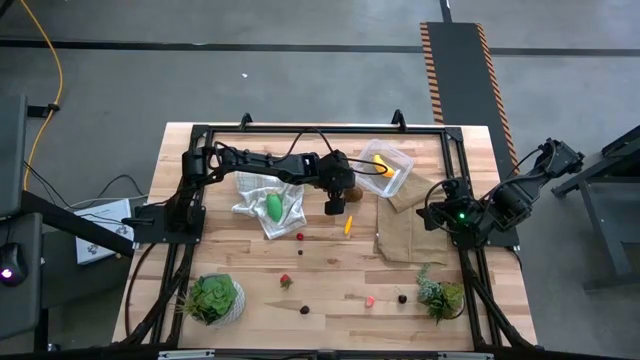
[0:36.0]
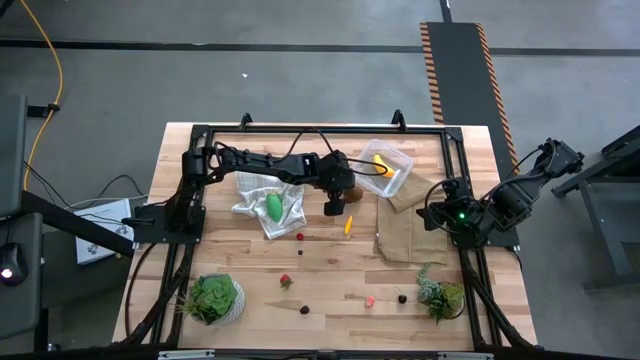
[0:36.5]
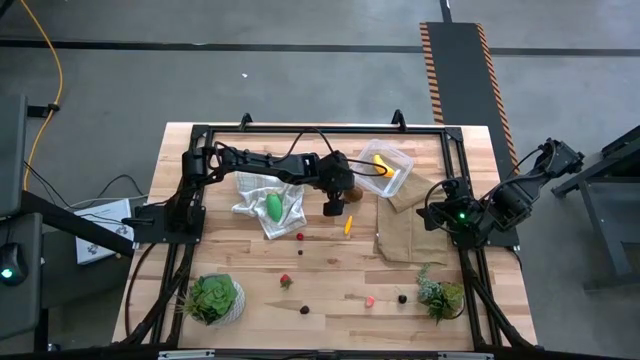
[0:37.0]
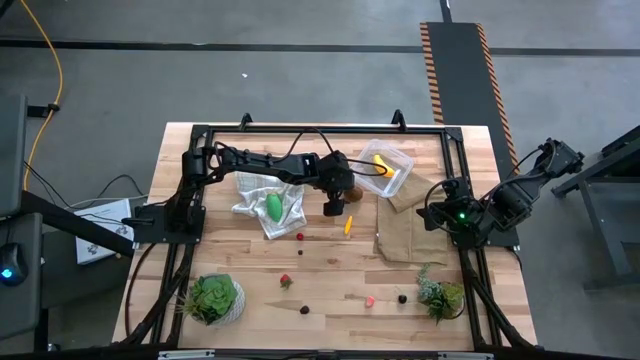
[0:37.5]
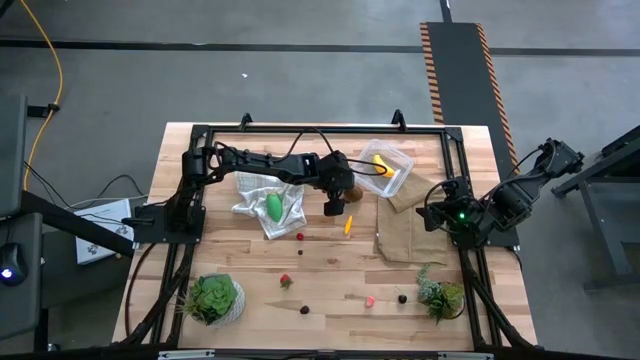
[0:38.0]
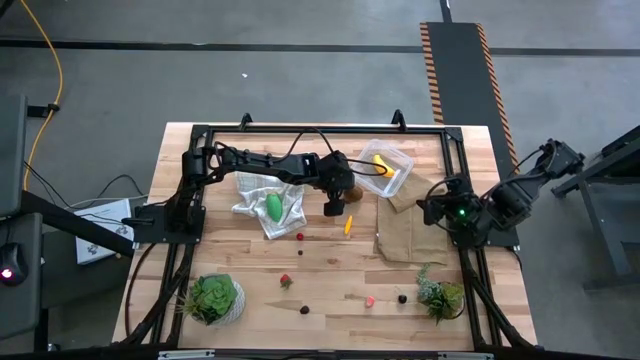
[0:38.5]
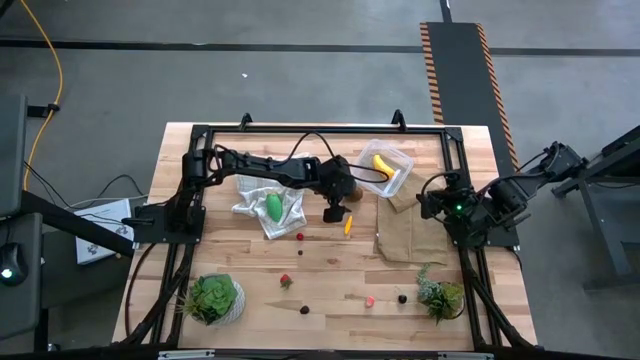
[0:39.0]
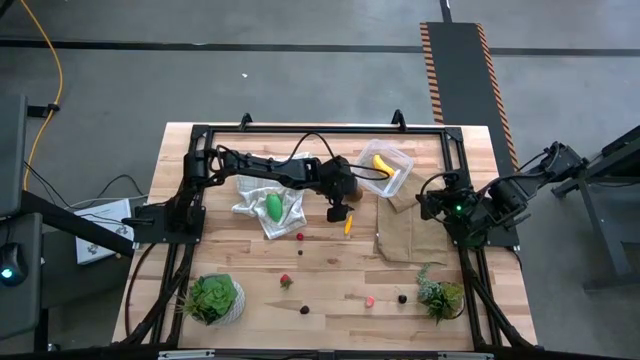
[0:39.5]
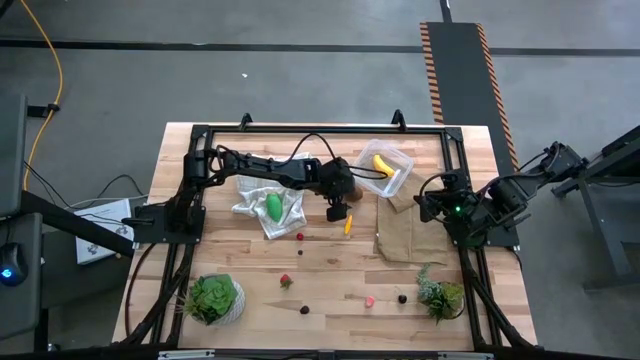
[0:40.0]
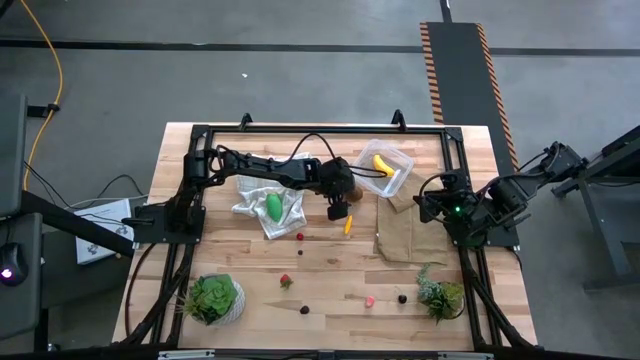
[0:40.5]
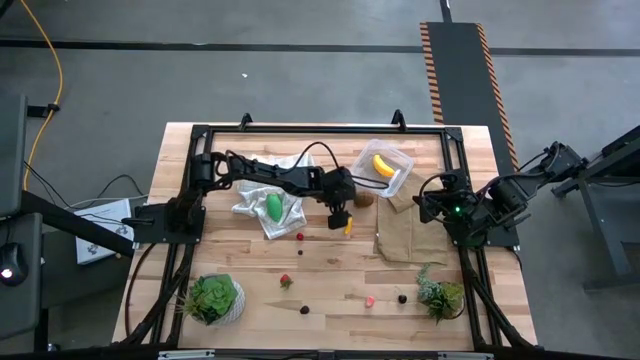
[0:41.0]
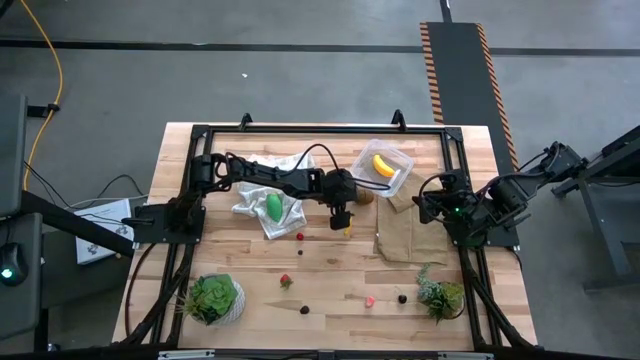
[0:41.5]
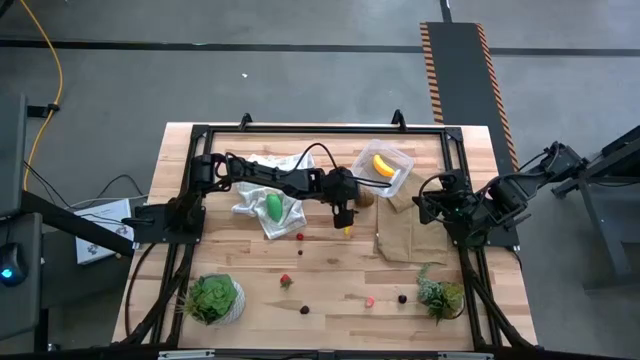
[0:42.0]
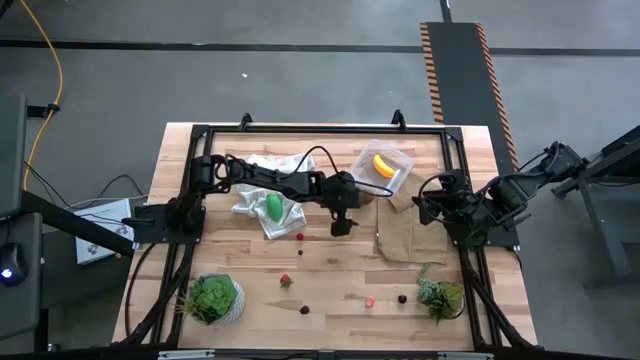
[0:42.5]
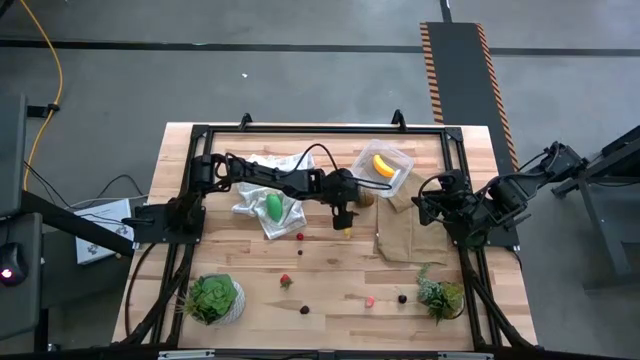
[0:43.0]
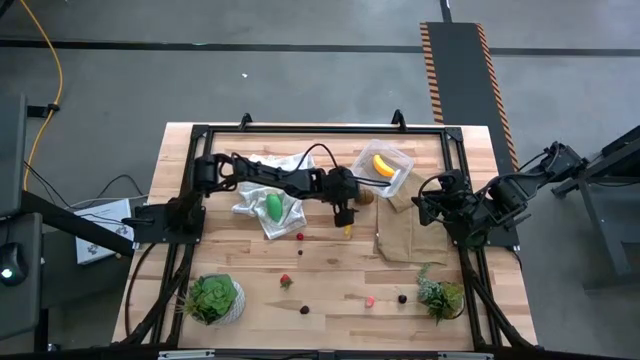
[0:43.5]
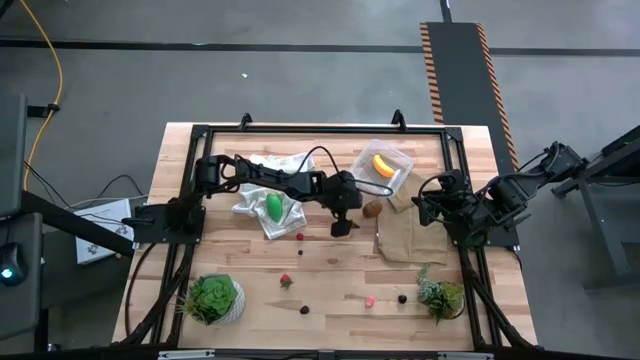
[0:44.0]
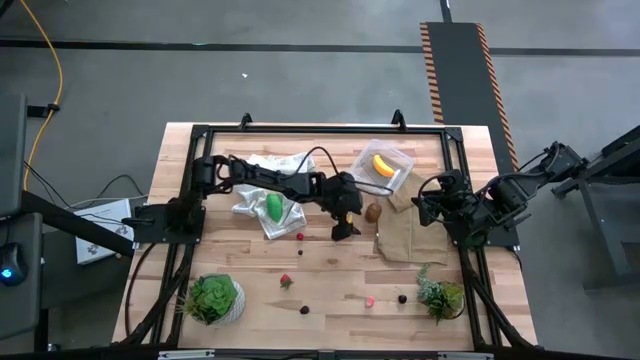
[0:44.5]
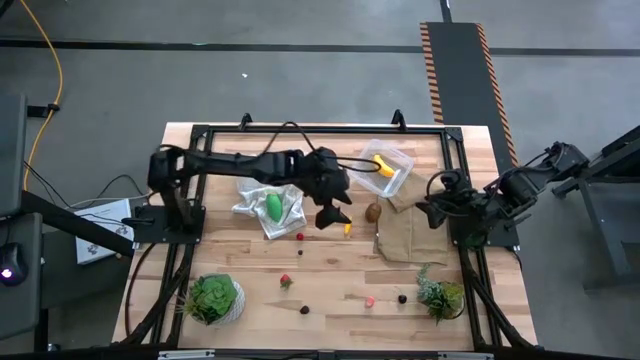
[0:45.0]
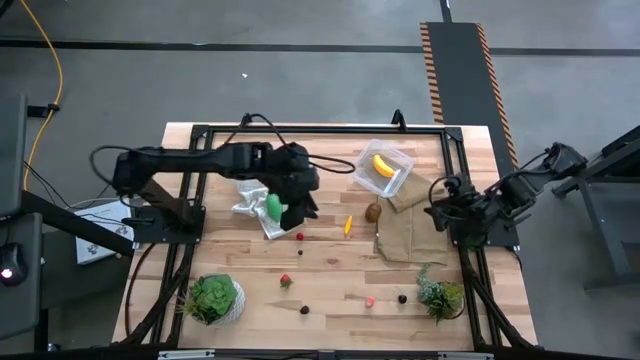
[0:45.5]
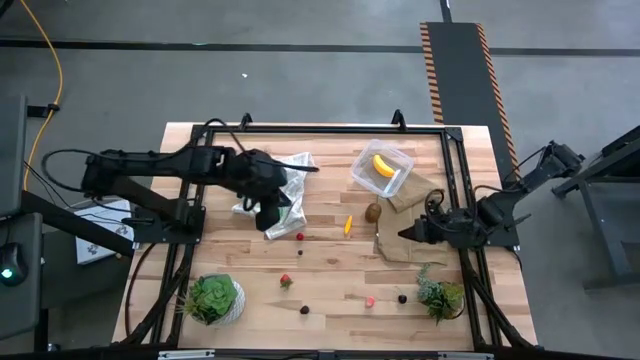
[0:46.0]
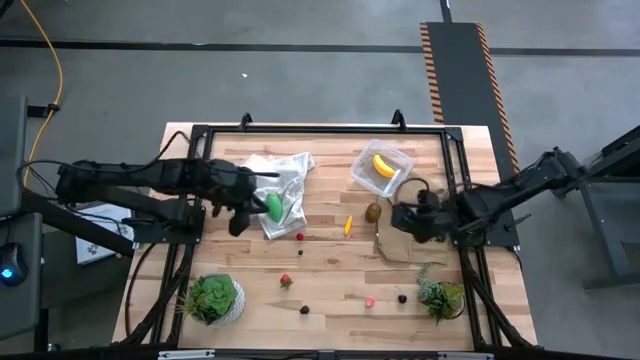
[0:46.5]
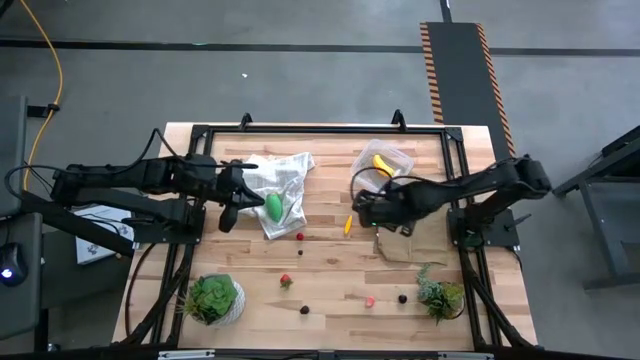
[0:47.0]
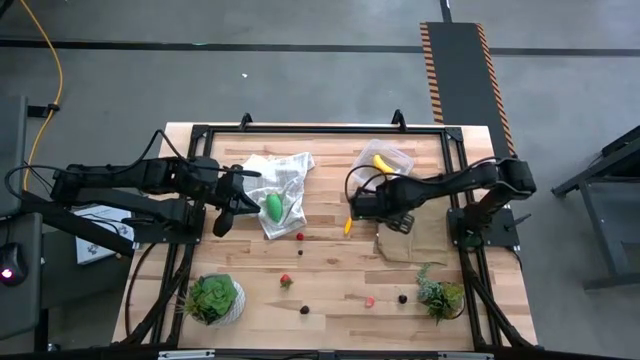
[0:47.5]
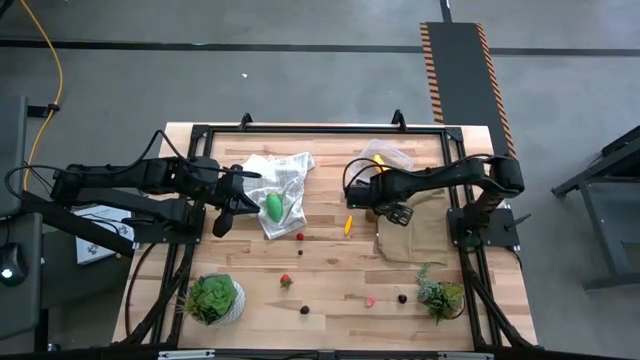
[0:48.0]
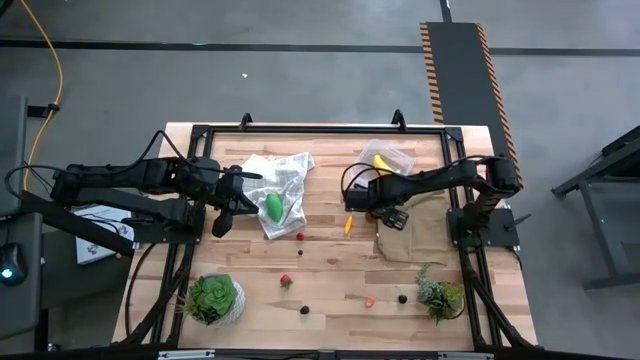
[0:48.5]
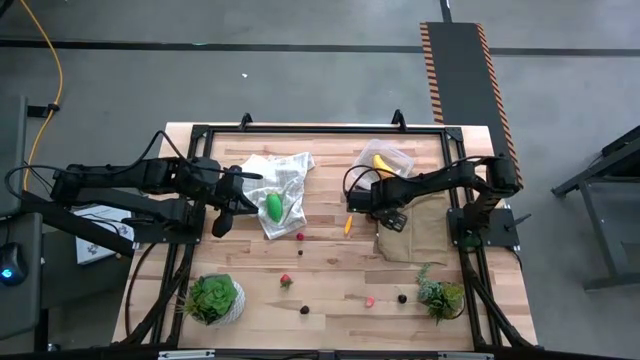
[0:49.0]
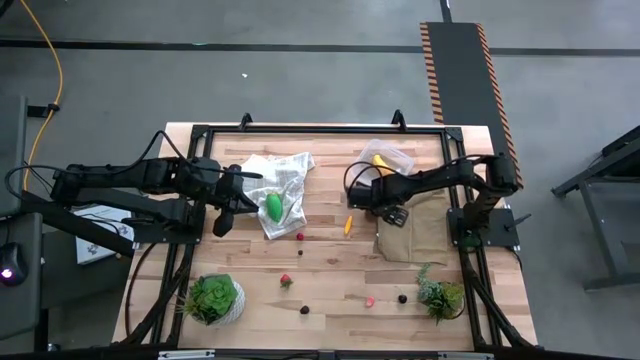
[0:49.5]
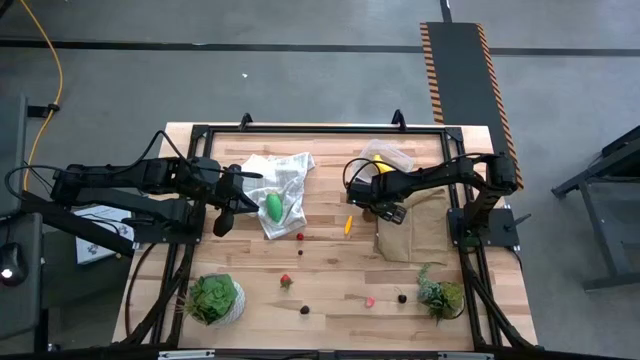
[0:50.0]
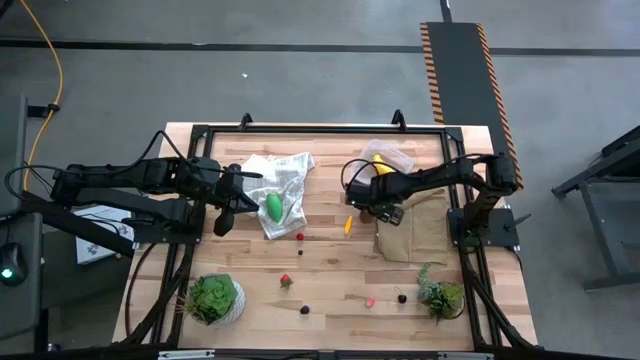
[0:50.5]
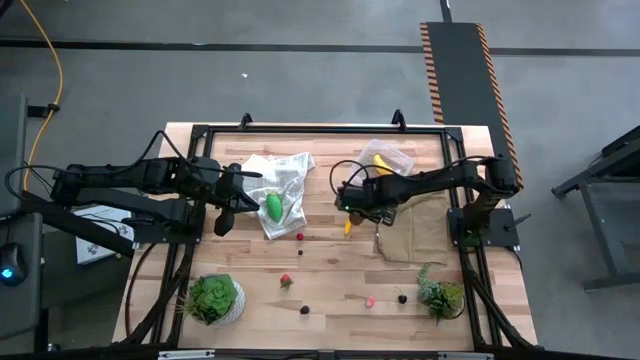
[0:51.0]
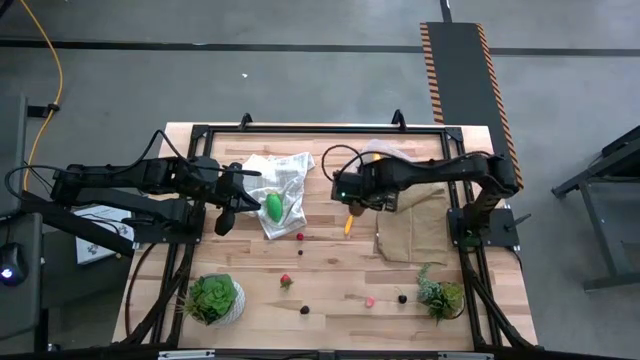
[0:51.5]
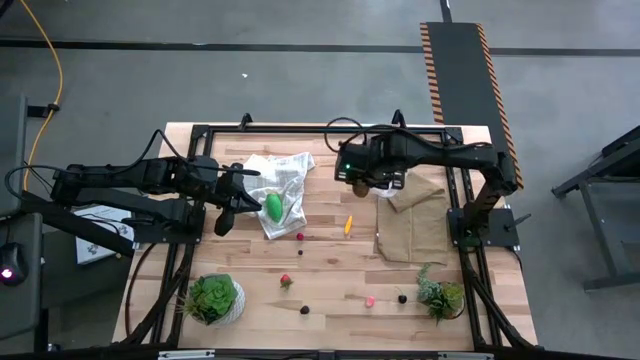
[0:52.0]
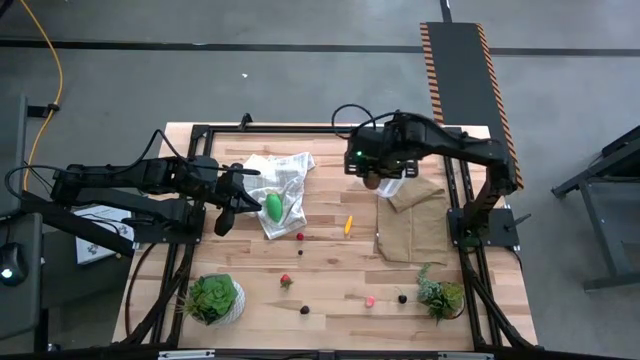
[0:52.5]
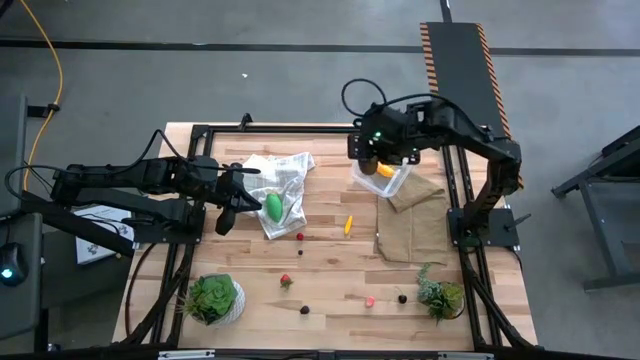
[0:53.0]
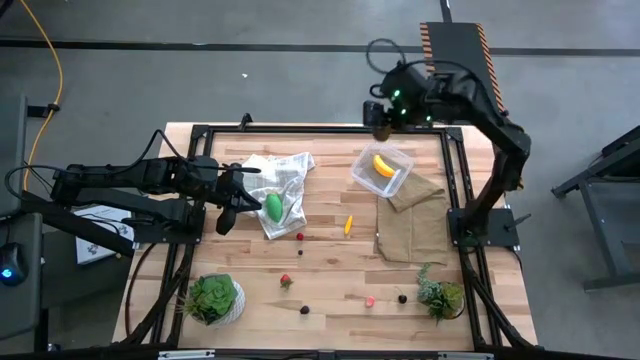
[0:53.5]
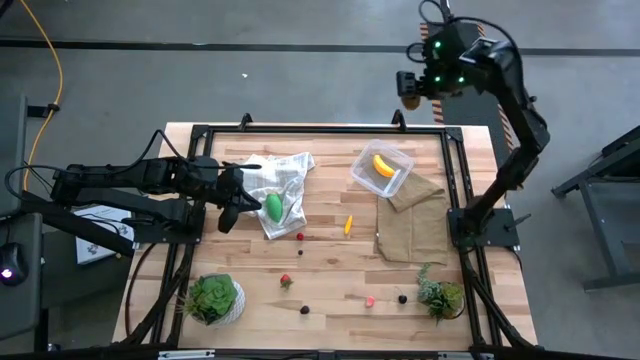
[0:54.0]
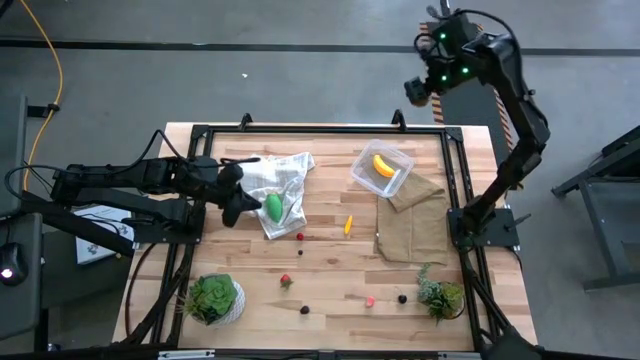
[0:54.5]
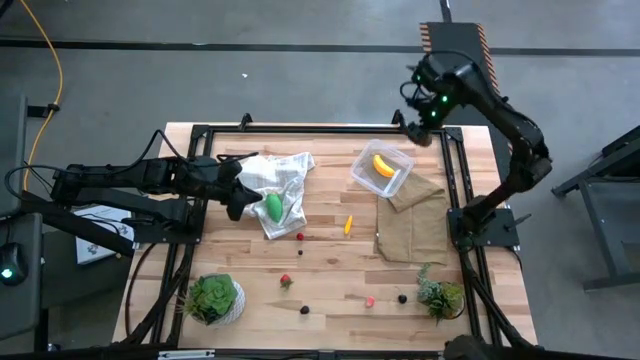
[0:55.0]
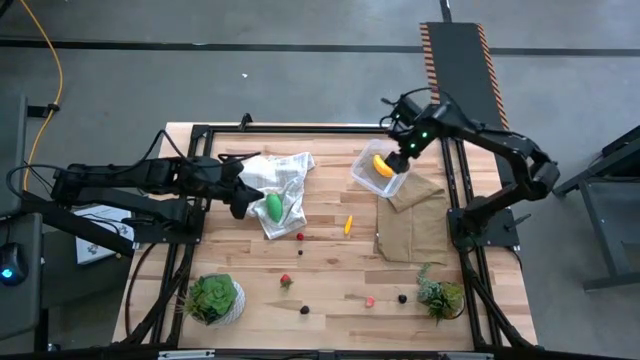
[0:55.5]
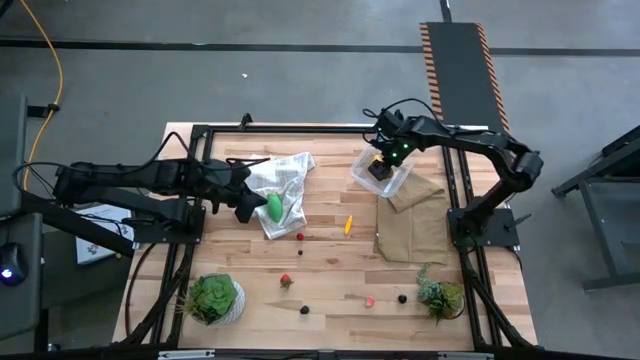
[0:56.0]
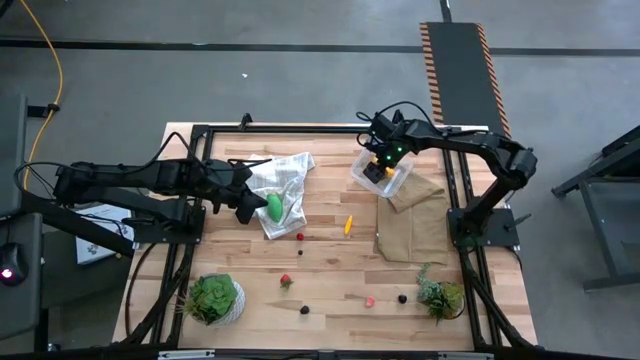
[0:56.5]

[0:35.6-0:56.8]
Task: Pick and placing Produce into tupperware
Put the brown kiwi into the transparent bin
